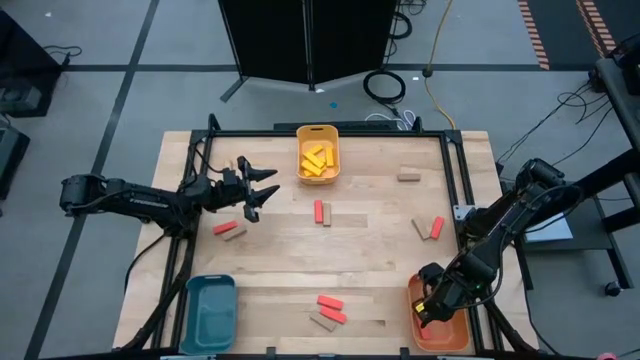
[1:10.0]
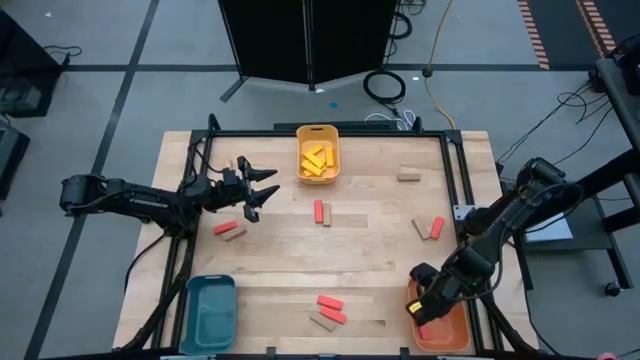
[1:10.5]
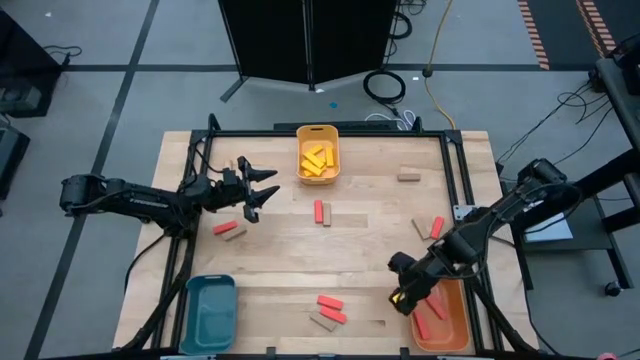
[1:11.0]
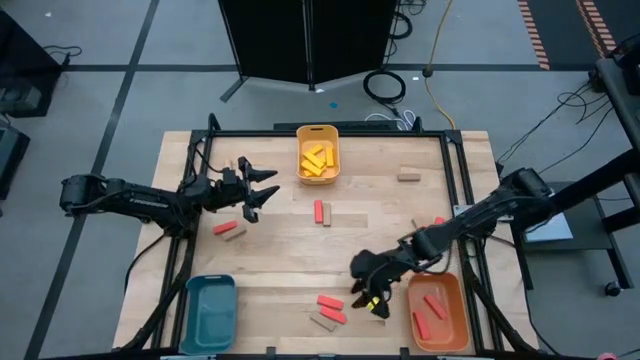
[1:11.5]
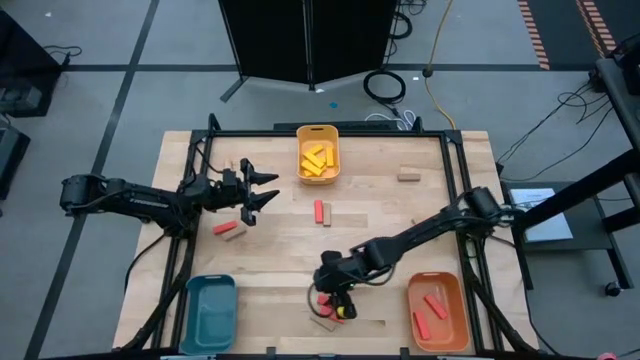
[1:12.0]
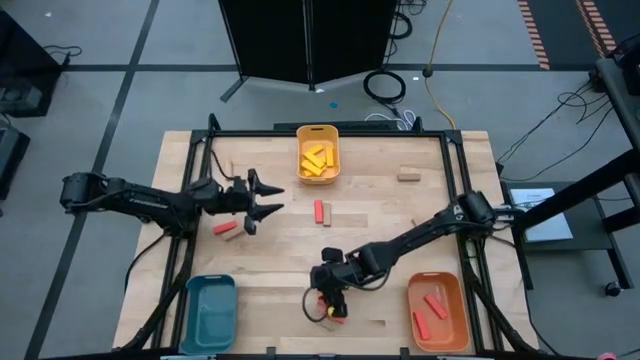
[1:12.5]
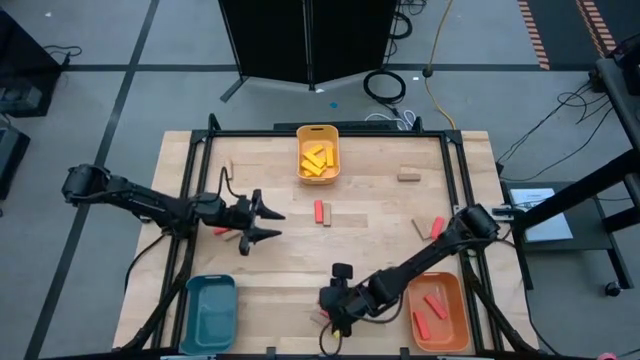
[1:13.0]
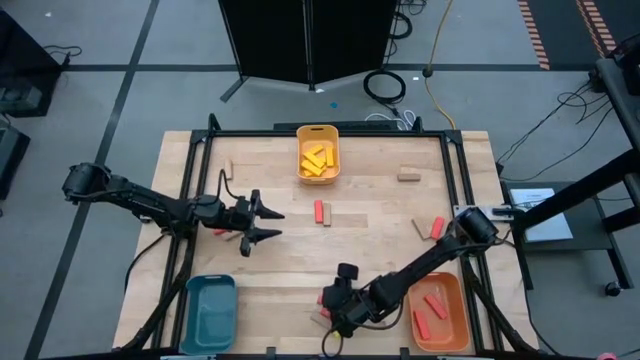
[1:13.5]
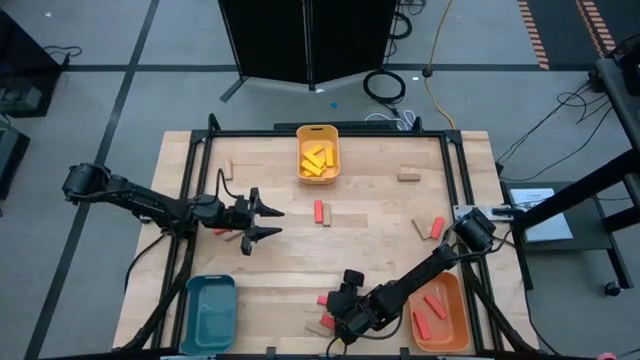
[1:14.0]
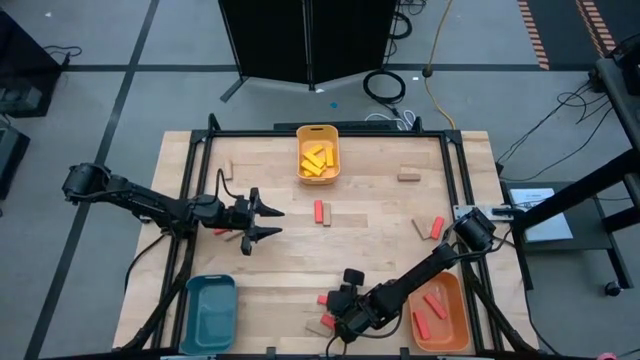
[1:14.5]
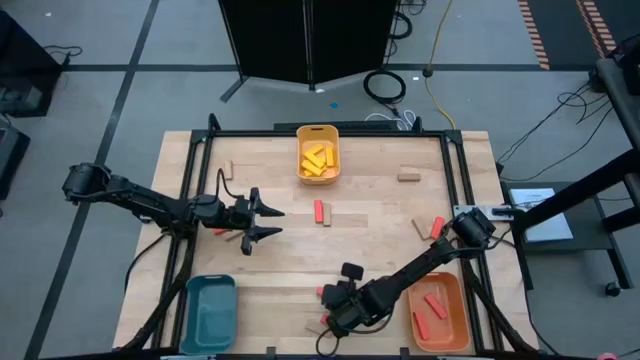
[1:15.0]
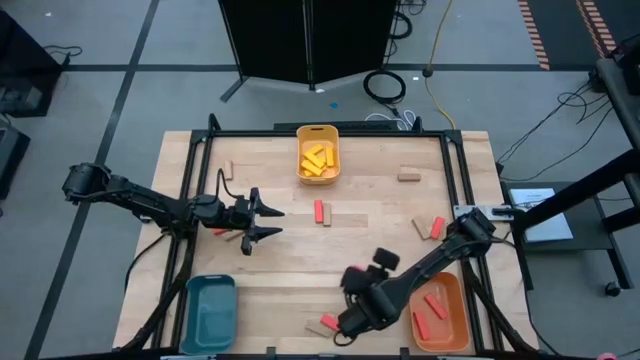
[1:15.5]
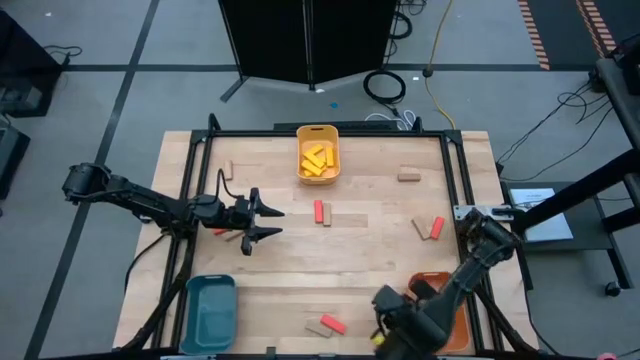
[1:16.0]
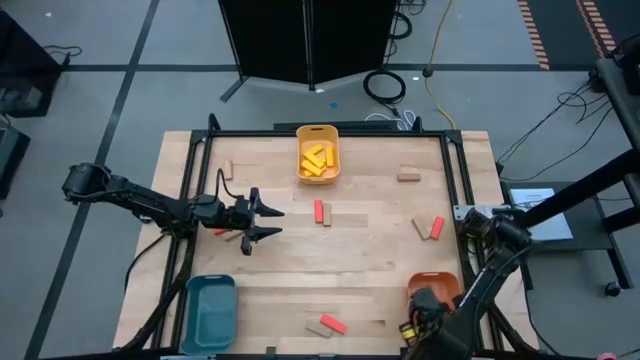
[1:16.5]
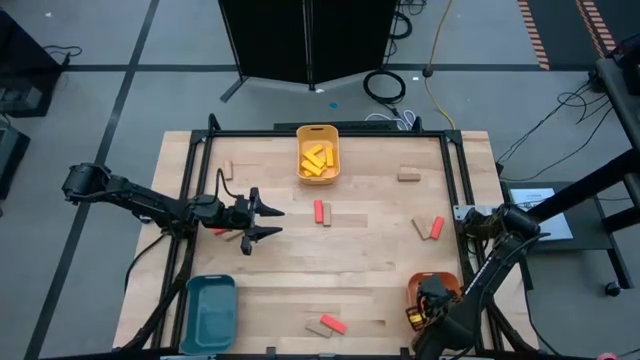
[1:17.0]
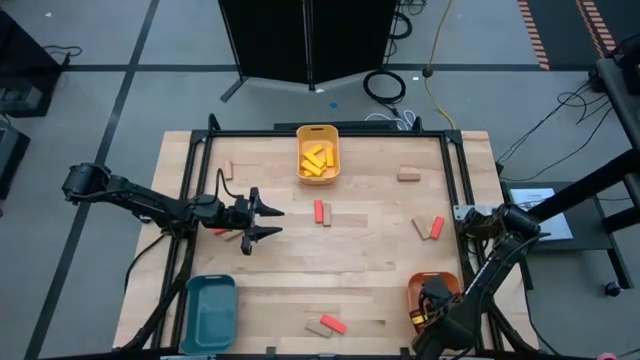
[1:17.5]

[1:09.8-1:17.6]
Task: Sort blocks
Put the orange block into the orange bin

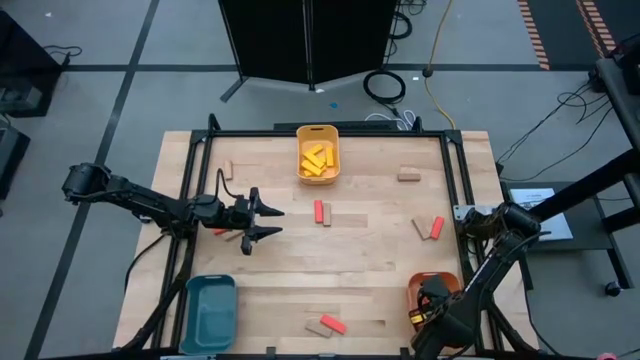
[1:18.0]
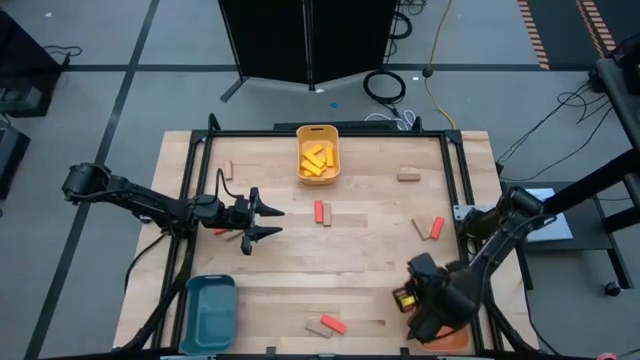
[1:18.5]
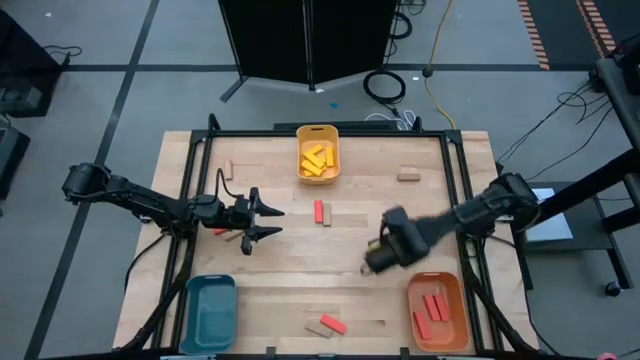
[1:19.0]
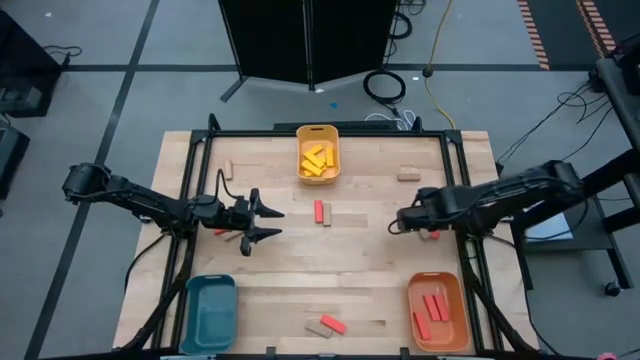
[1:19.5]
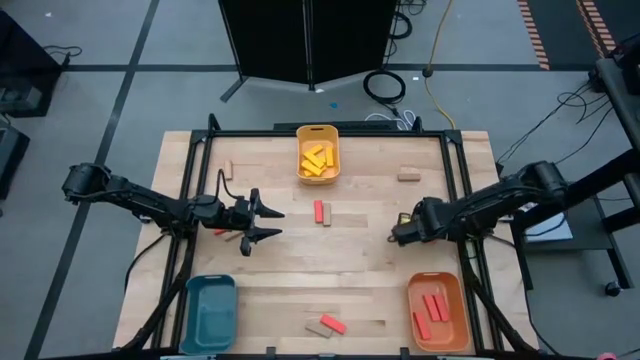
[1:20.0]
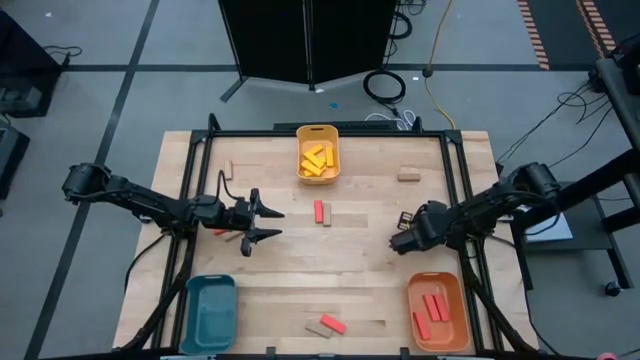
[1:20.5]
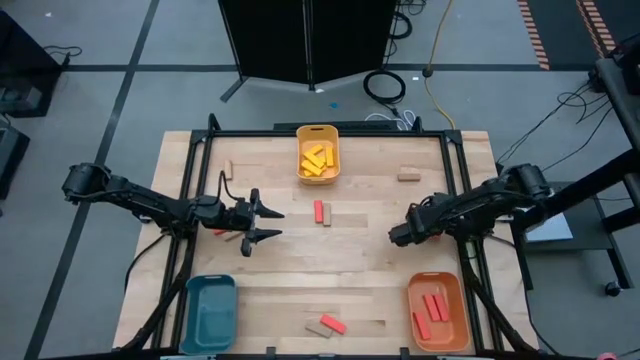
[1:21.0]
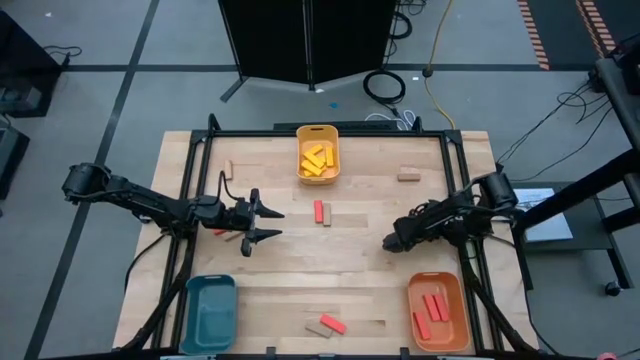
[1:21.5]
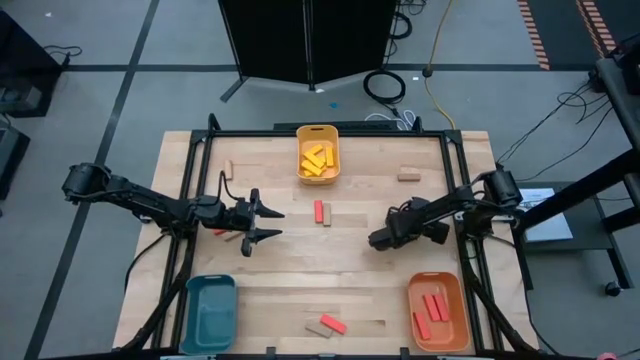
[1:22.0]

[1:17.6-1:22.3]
Adjust the orange block

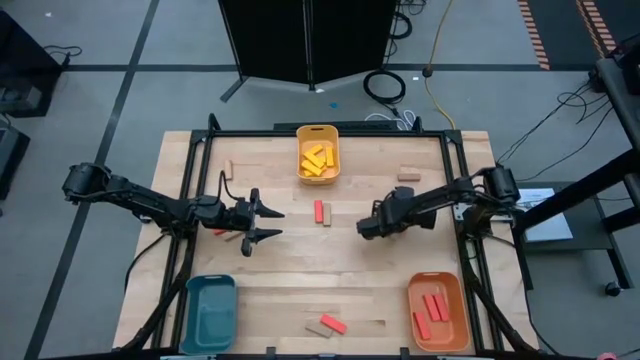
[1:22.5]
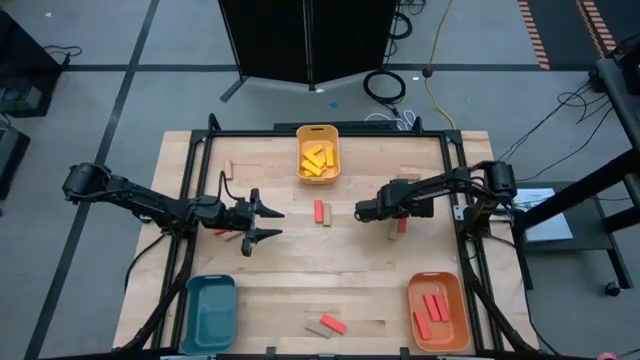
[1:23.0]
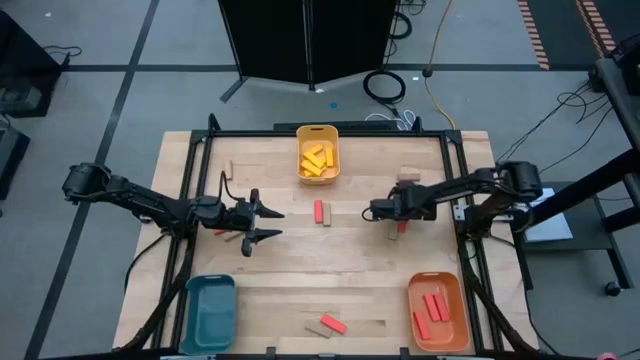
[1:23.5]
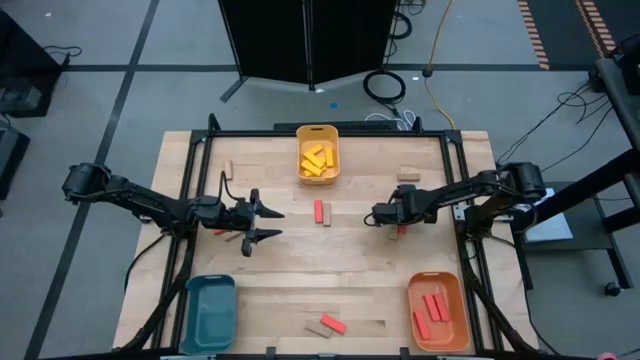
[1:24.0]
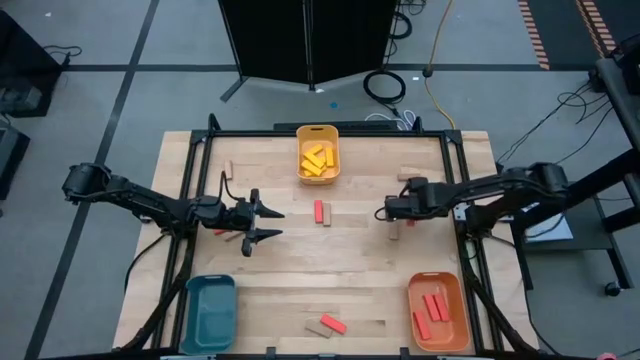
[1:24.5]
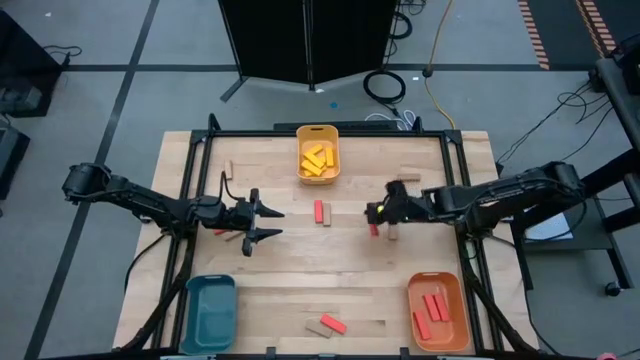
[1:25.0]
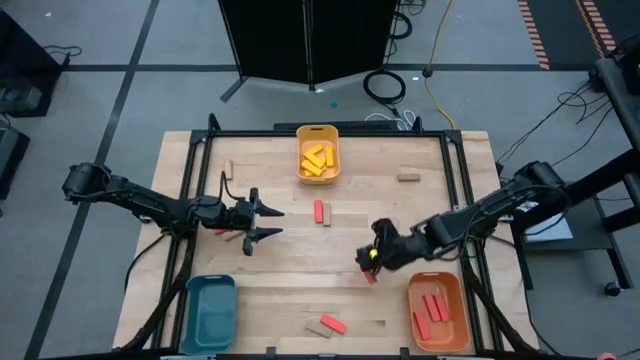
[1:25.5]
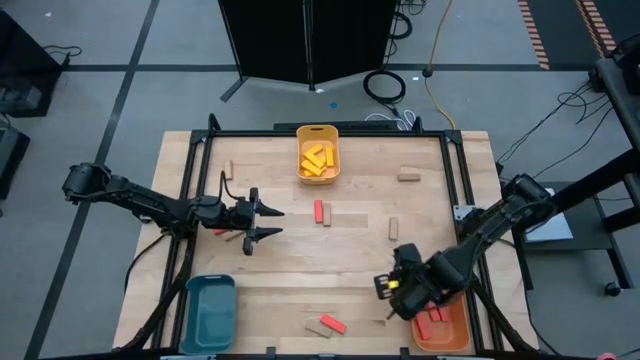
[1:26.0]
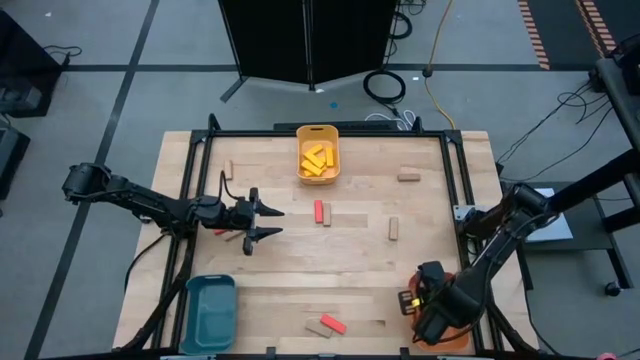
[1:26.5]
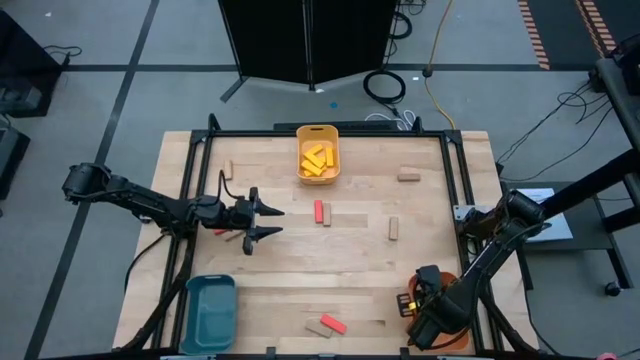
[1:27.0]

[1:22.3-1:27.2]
Put the orange block into the orange bin

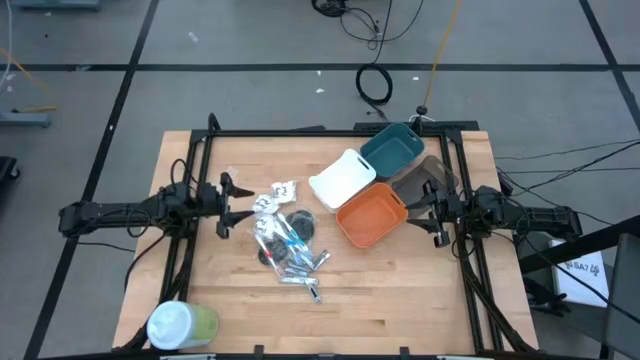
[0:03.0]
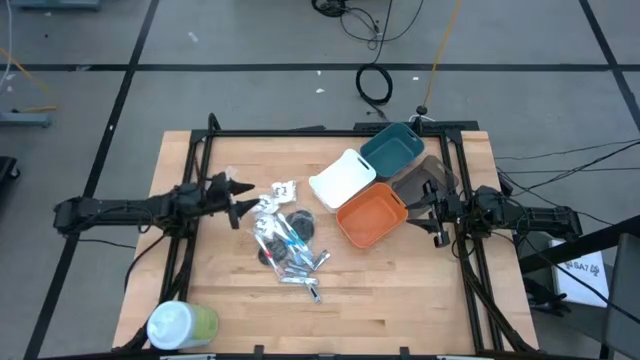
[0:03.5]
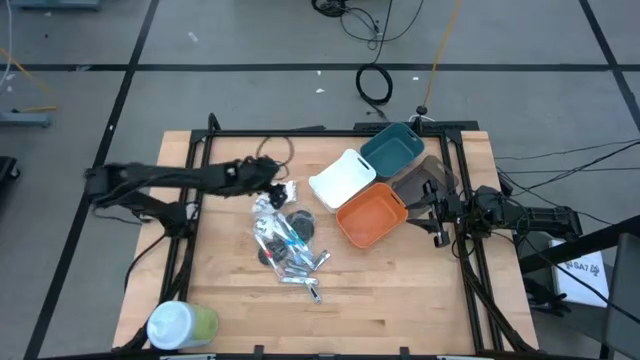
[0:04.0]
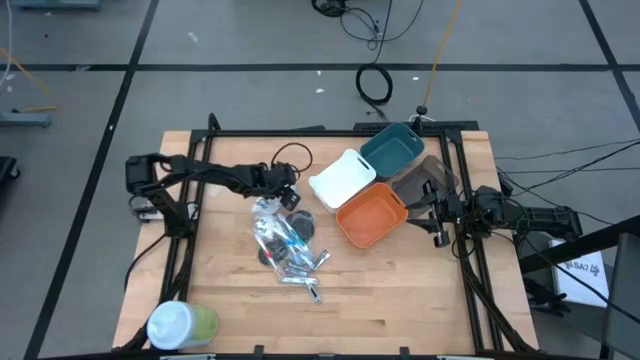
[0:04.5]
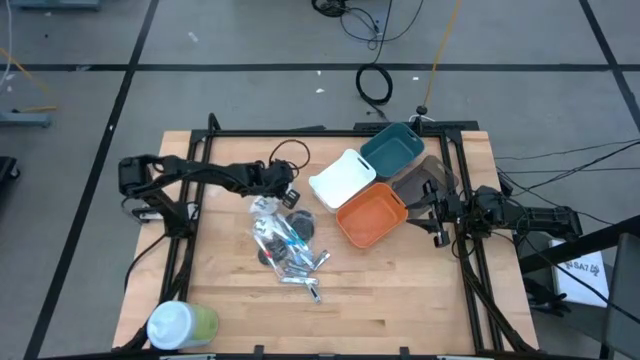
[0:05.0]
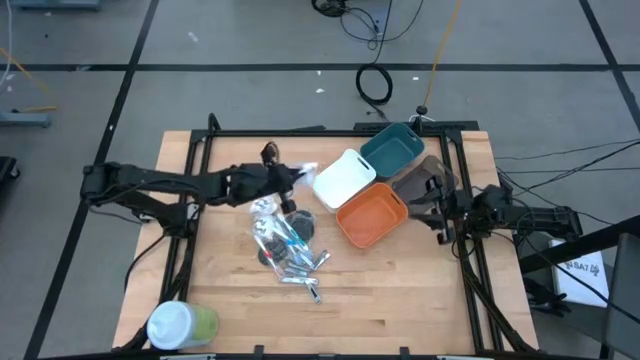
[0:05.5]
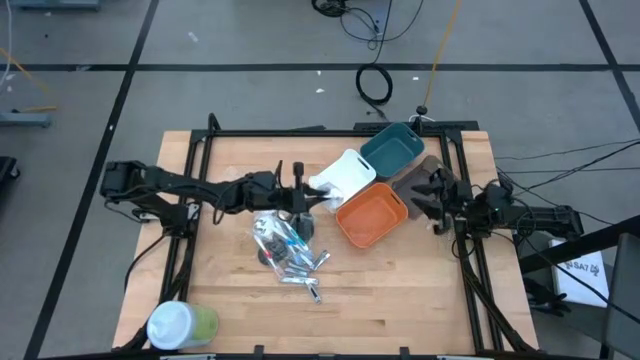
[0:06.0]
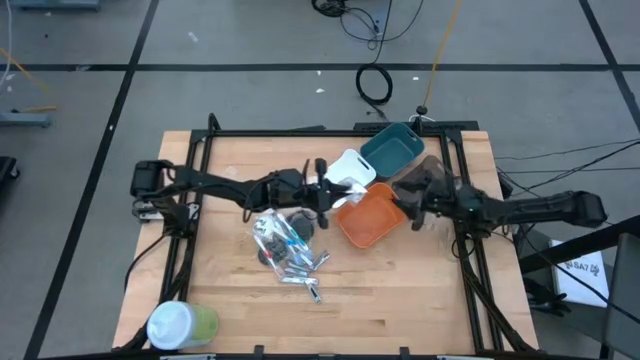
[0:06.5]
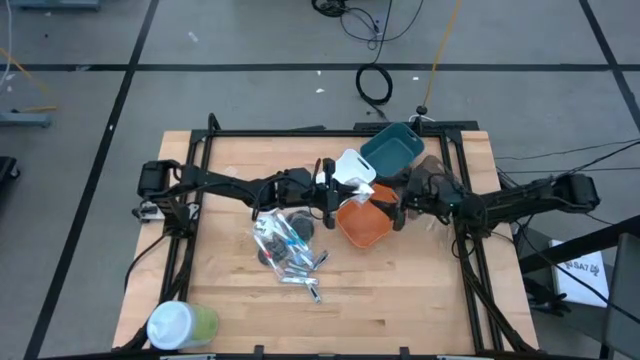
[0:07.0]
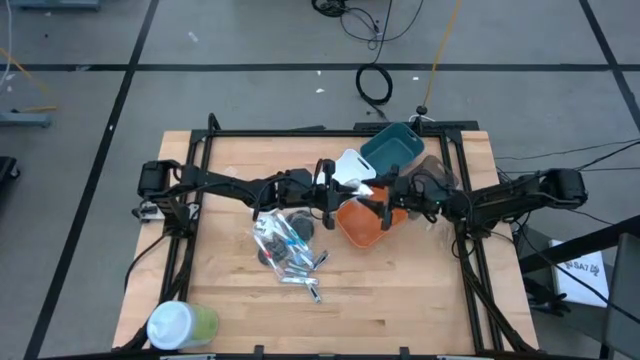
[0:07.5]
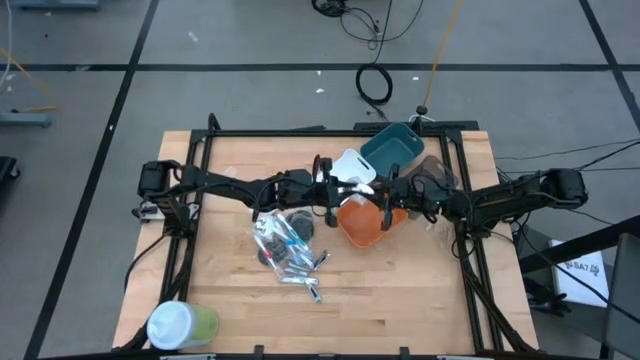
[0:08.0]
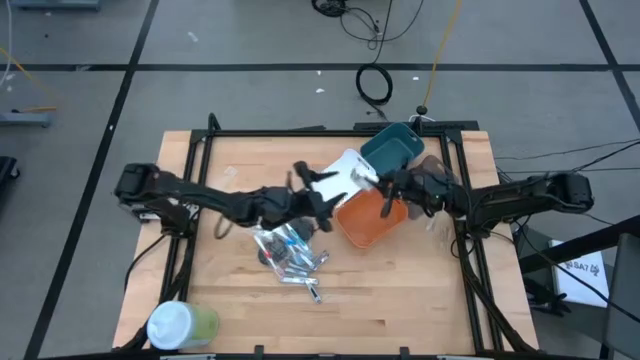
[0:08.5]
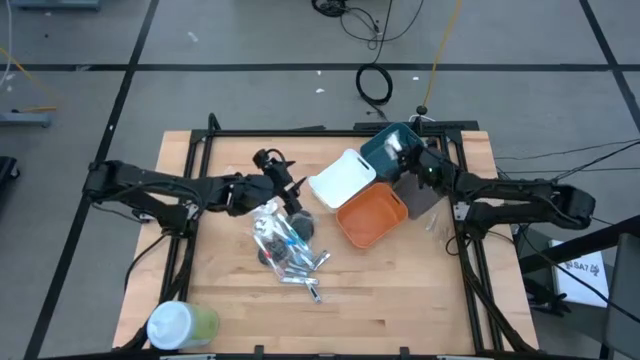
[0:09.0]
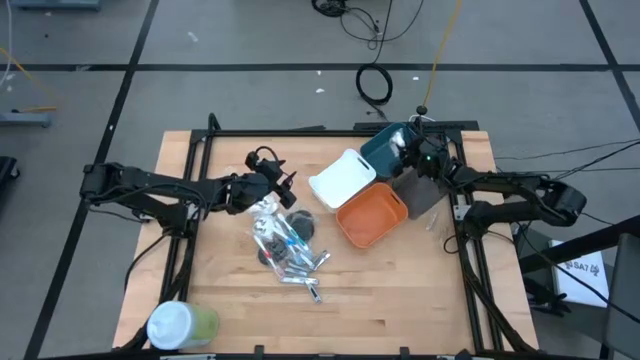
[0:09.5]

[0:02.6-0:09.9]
Task: Pick & Place Travel size toiletries
Put the white cotton pack into the blue bin
